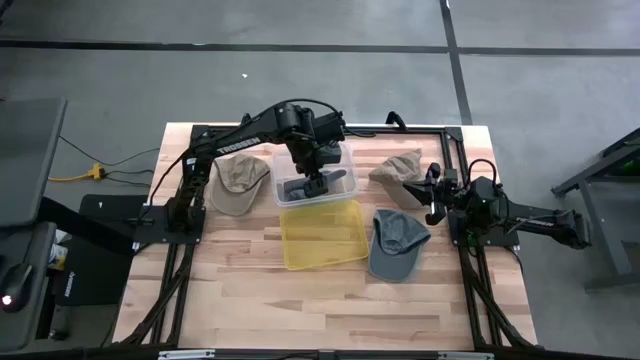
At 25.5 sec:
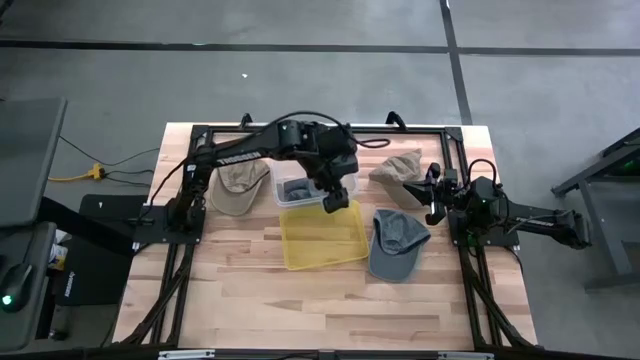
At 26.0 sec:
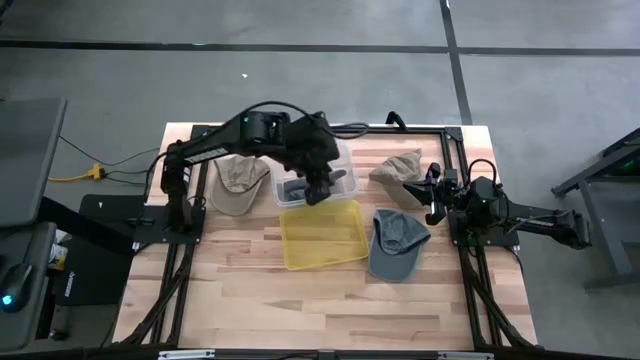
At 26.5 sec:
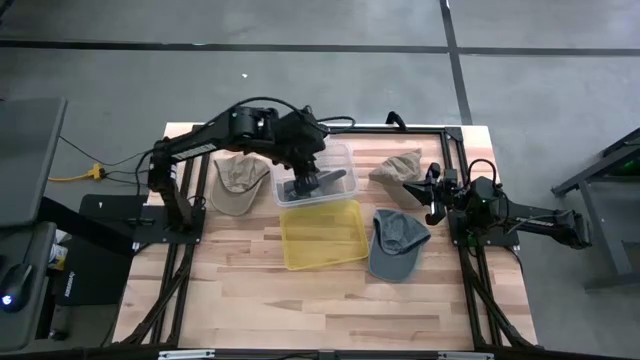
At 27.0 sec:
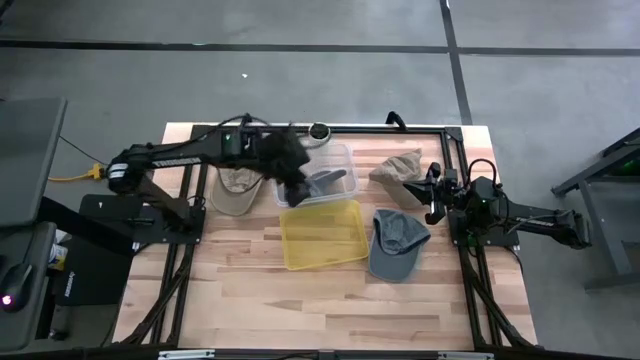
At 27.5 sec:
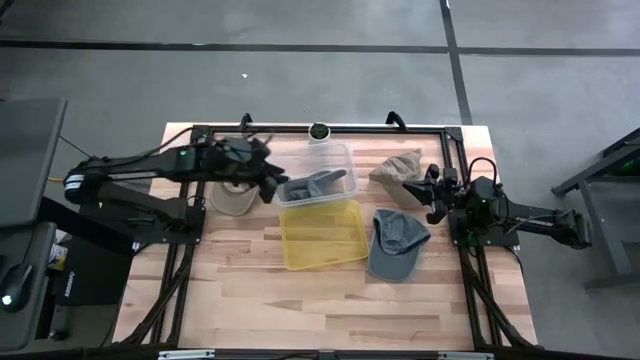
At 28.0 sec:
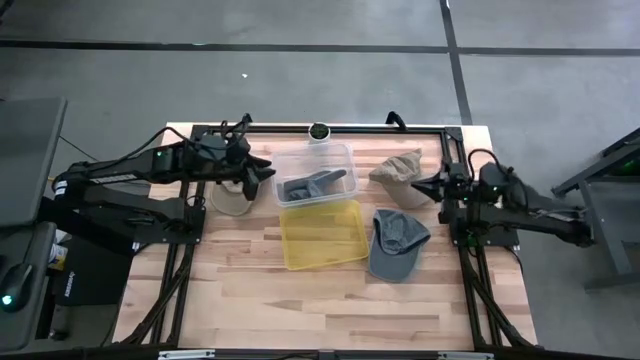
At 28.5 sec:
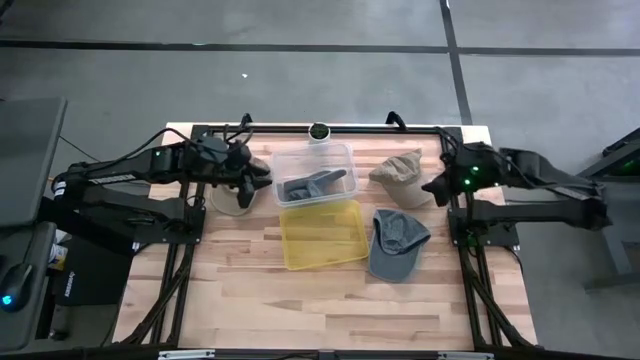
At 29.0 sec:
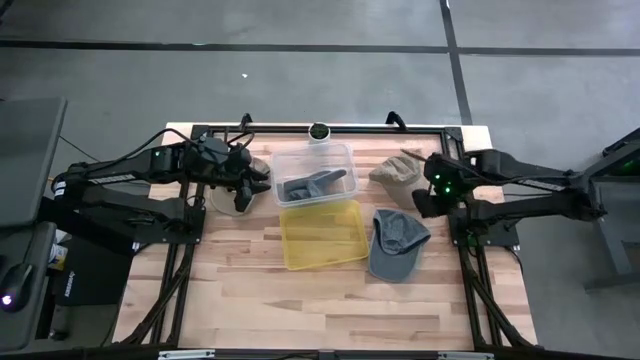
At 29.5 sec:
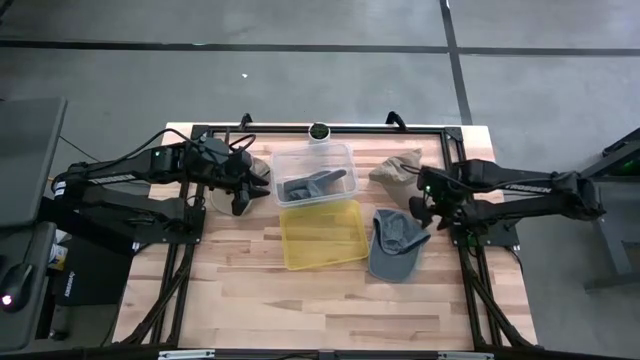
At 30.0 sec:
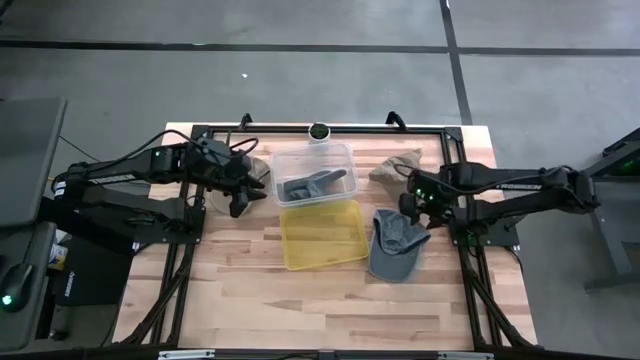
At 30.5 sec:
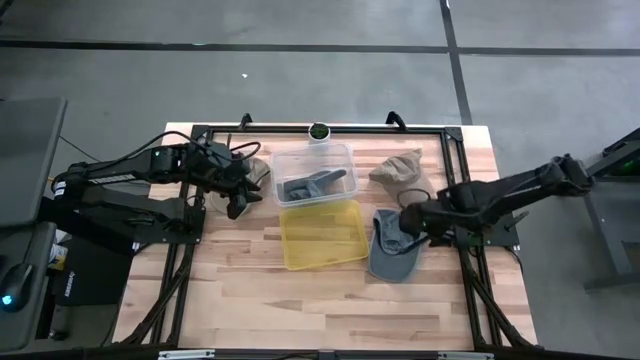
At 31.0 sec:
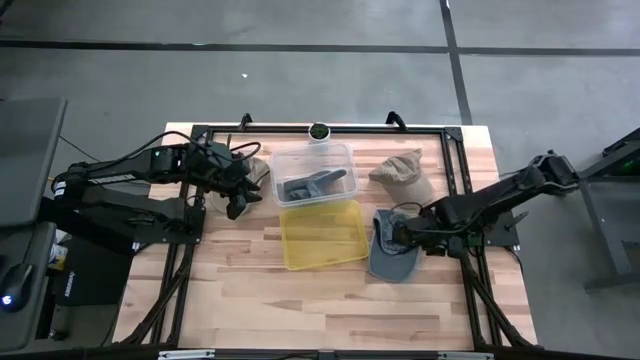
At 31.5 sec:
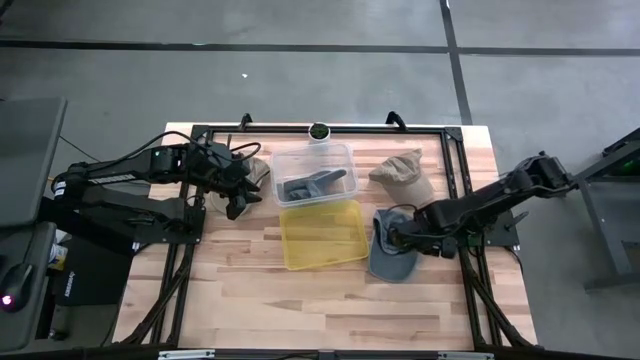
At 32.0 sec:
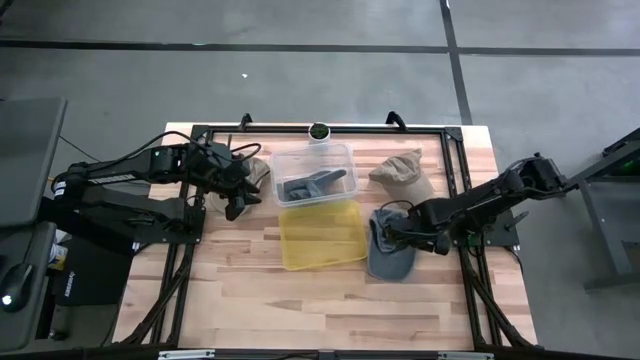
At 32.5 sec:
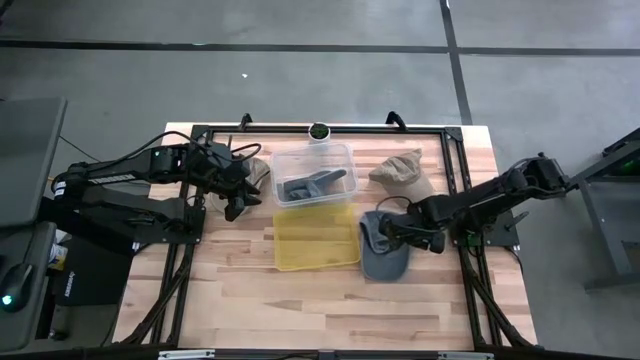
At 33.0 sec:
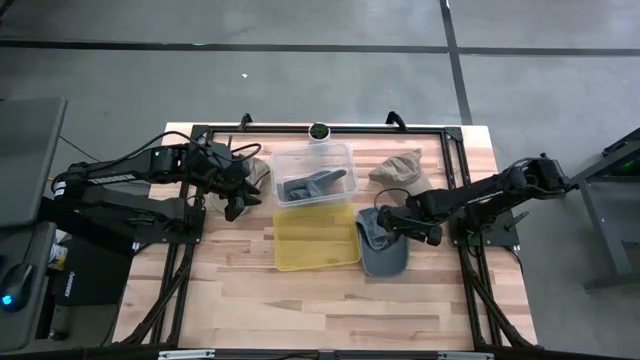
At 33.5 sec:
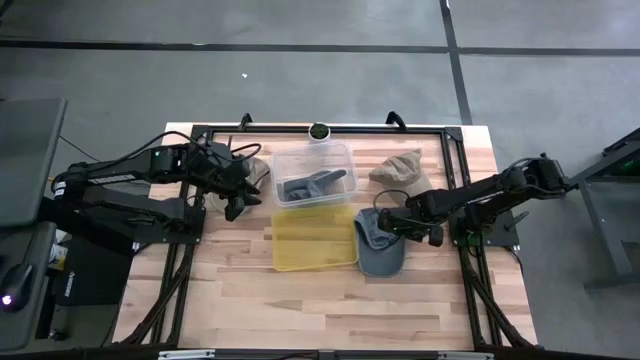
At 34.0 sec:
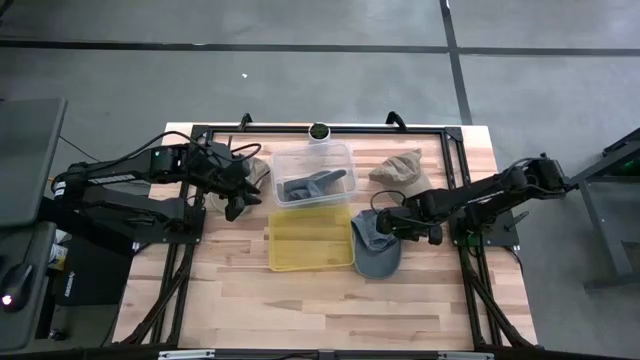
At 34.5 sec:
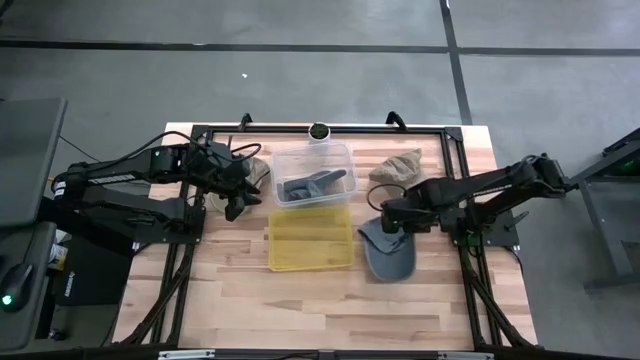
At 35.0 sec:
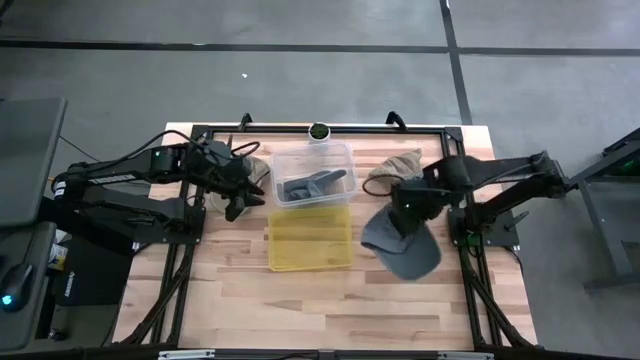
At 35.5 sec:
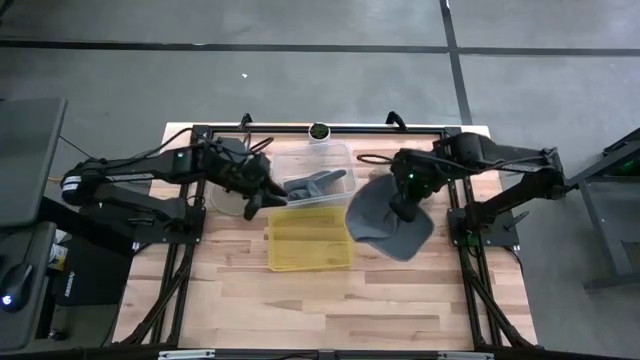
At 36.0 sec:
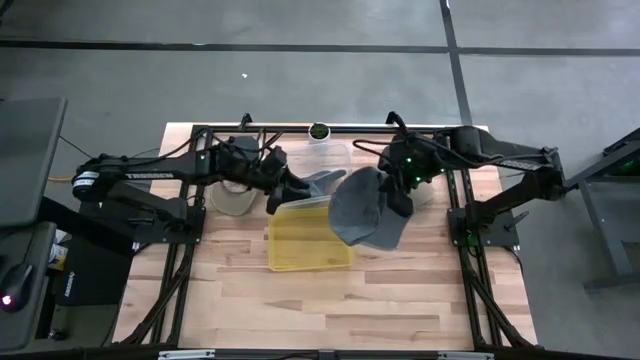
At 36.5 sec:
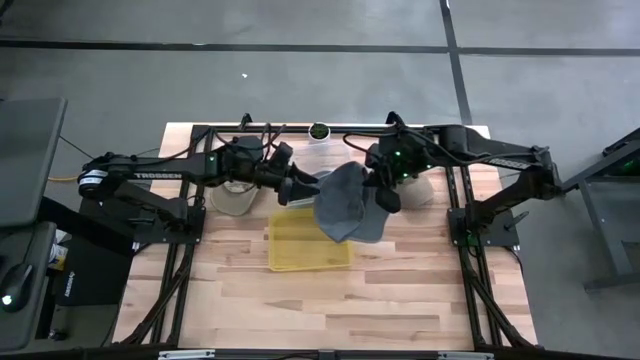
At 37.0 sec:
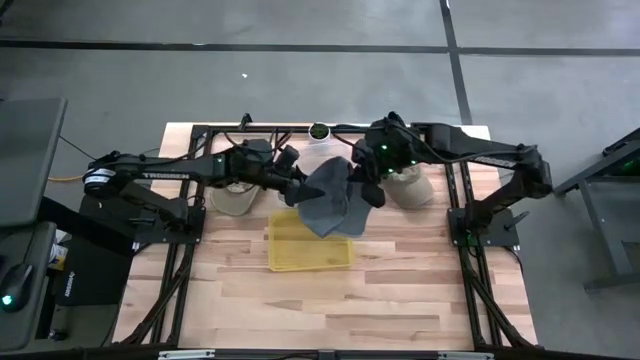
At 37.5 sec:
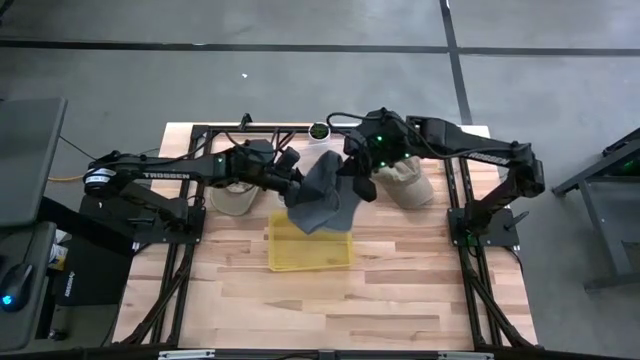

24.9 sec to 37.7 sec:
Task: Pick & Place hat
Put the gray cap into the transparent bin

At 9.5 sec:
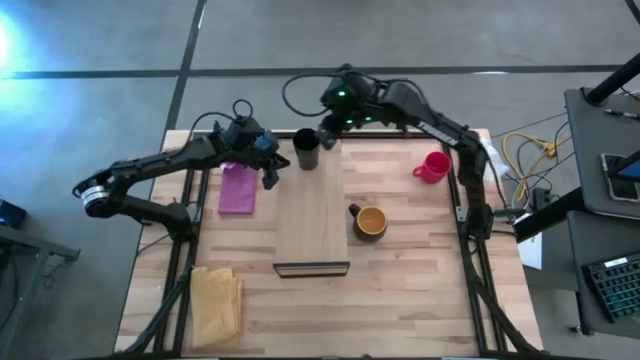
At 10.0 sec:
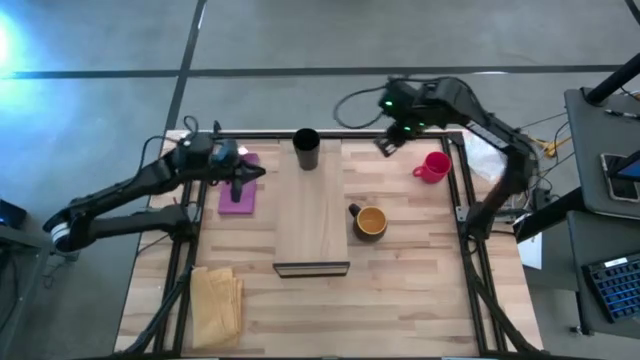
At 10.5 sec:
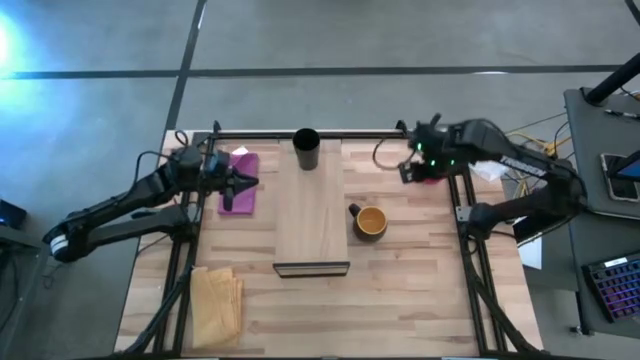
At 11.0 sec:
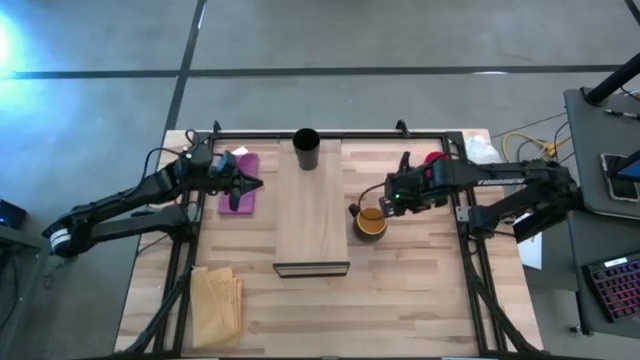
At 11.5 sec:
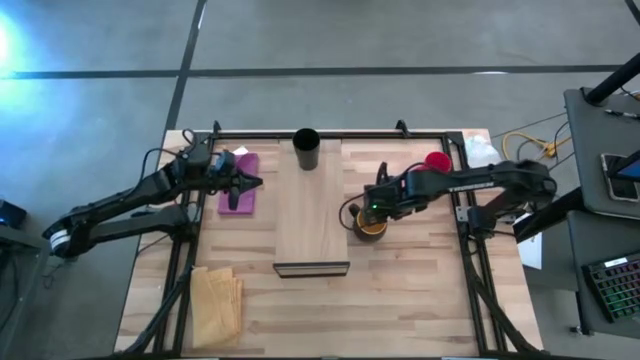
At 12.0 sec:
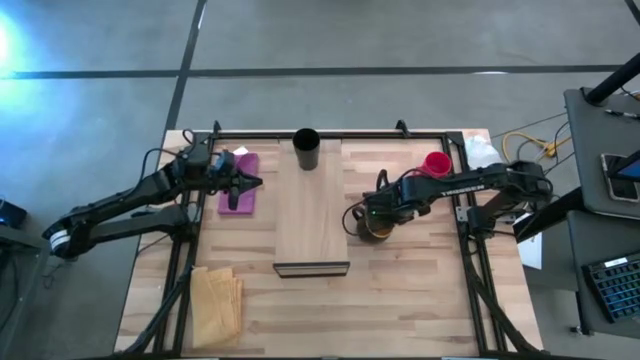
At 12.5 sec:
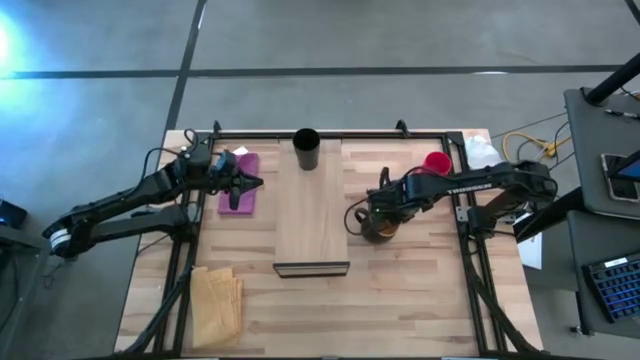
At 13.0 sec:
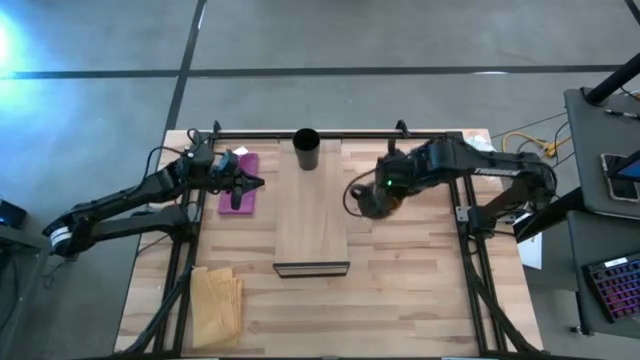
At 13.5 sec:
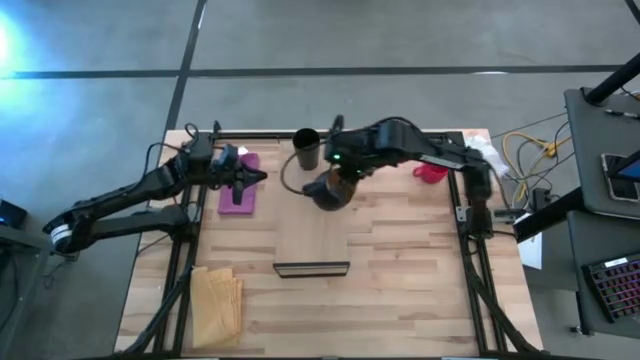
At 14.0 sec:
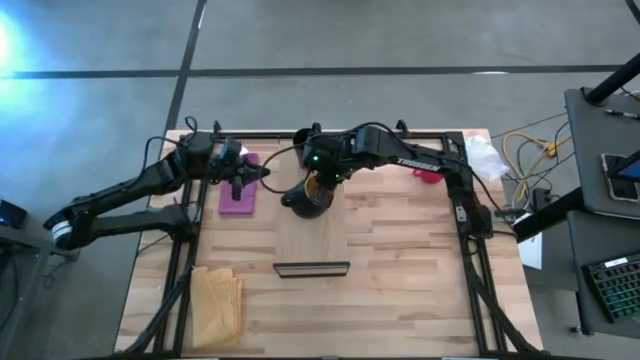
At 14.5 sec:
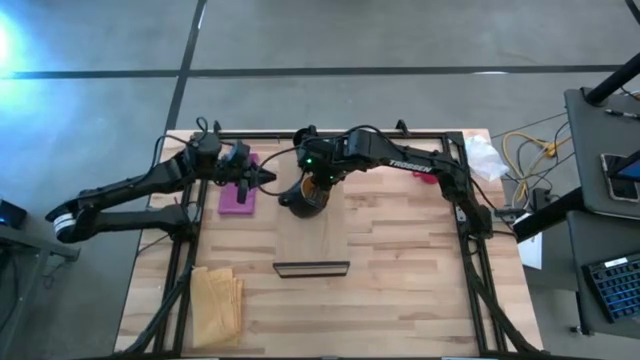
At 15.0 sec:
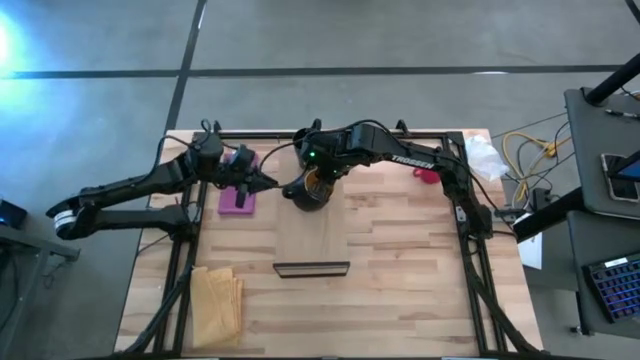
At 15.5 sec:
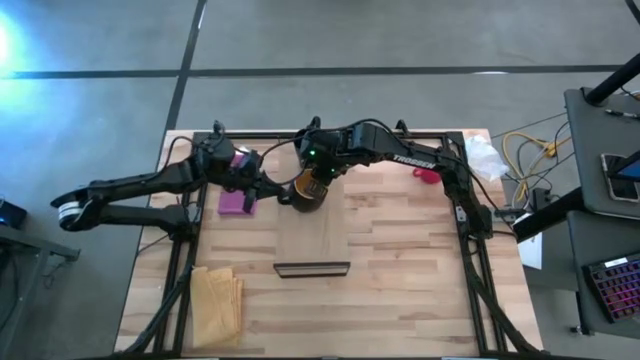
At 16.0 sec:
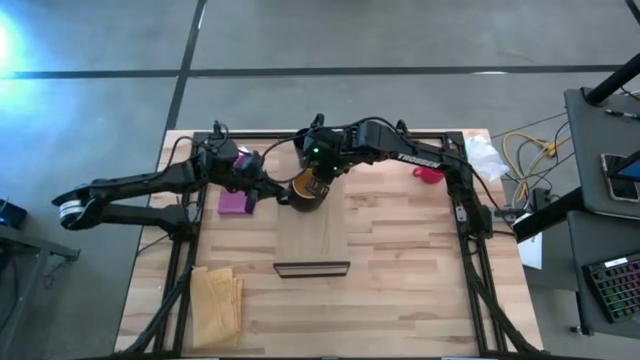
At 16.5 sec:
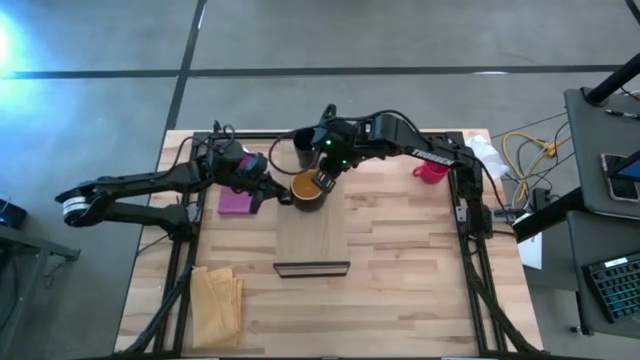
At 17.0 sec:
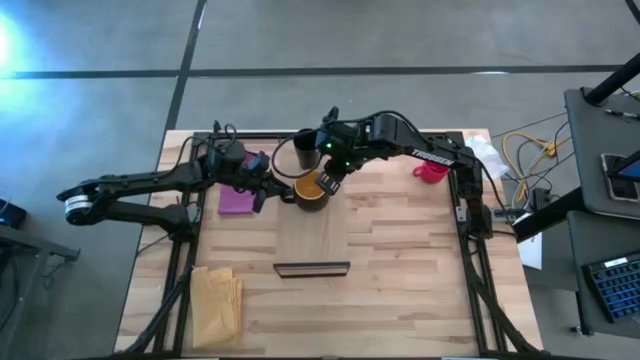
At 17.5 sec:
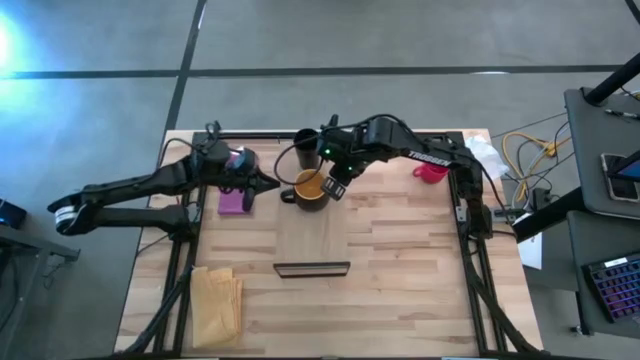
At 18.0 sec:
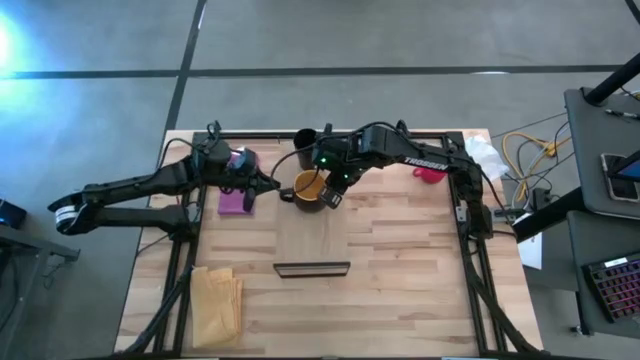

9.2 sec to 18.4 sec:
Task: Stack small to large cups/mugs on shelf
Put the black mug on the shelf
